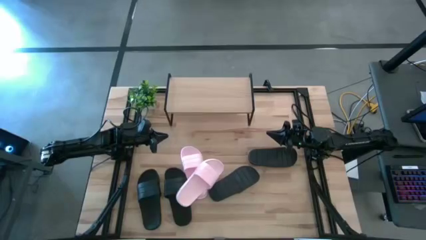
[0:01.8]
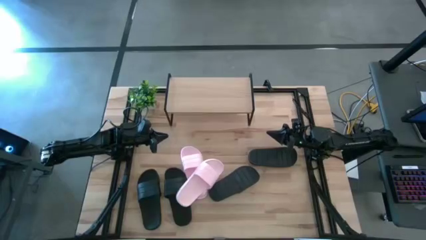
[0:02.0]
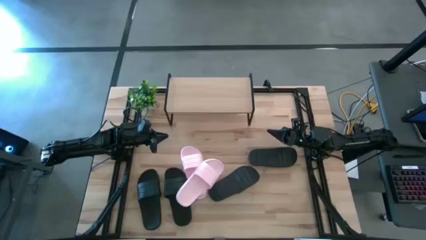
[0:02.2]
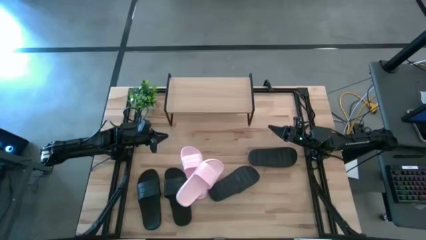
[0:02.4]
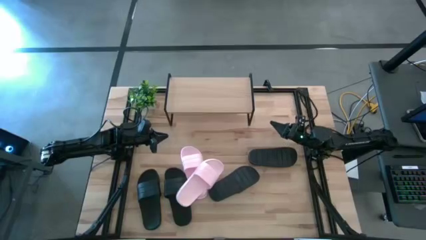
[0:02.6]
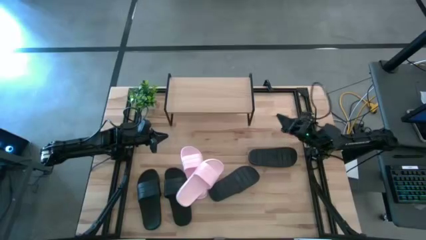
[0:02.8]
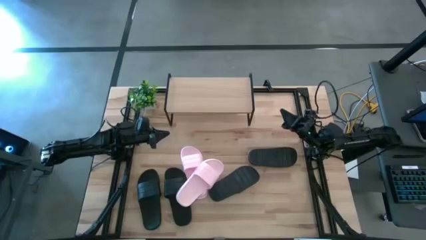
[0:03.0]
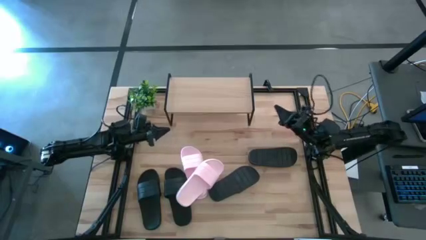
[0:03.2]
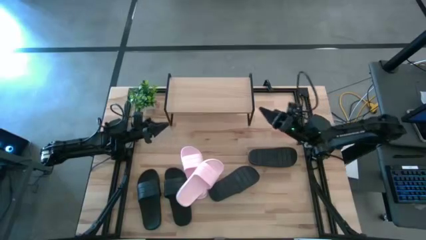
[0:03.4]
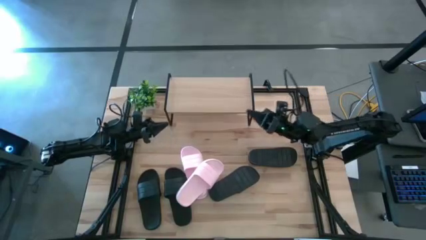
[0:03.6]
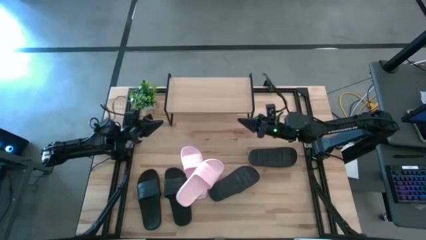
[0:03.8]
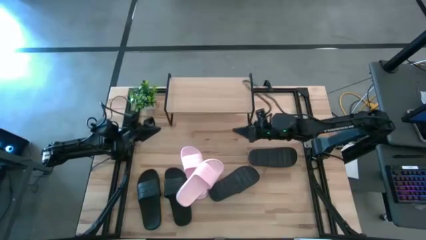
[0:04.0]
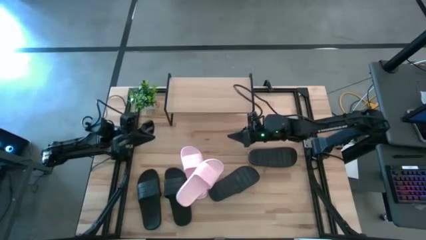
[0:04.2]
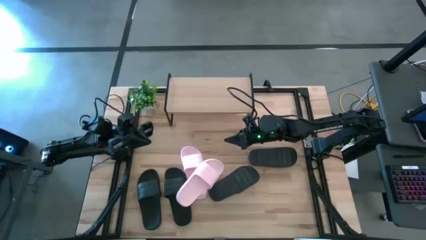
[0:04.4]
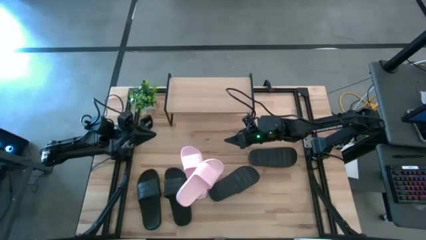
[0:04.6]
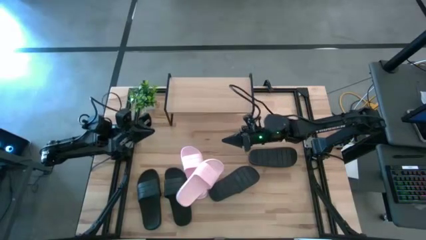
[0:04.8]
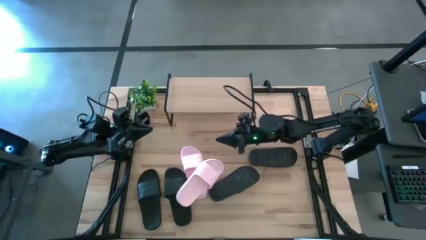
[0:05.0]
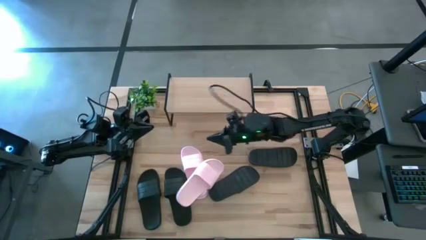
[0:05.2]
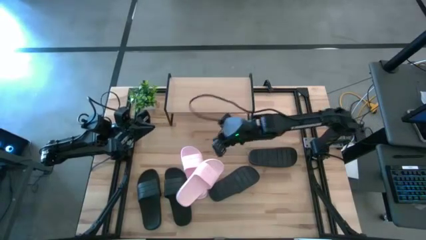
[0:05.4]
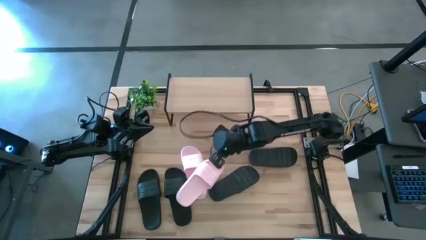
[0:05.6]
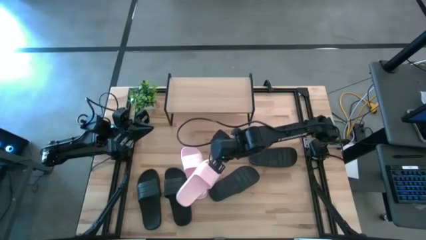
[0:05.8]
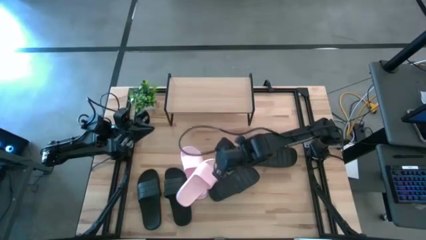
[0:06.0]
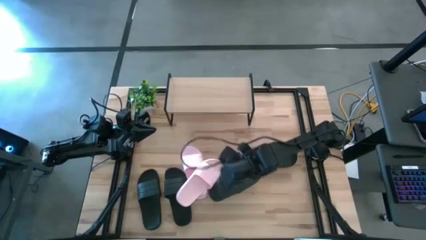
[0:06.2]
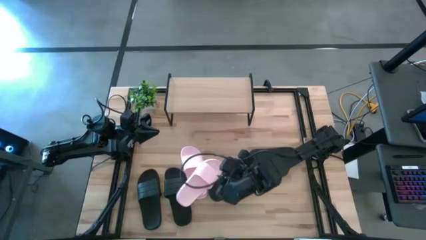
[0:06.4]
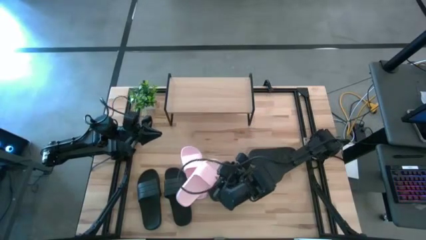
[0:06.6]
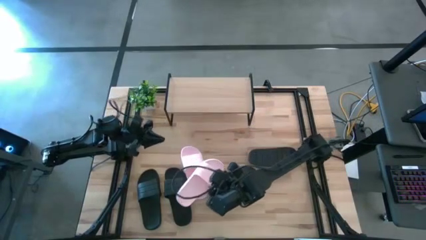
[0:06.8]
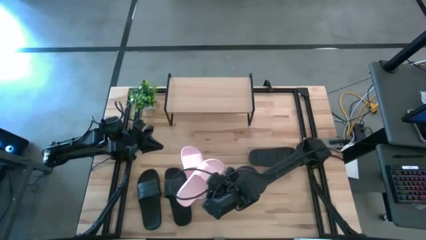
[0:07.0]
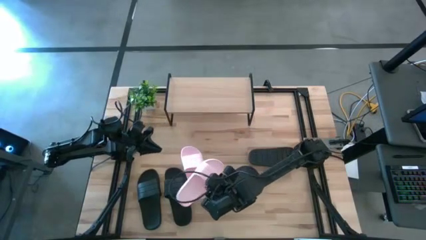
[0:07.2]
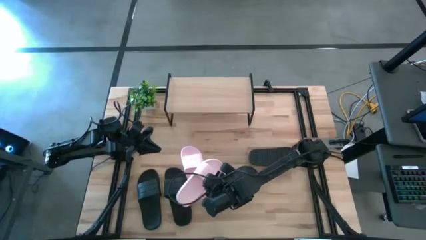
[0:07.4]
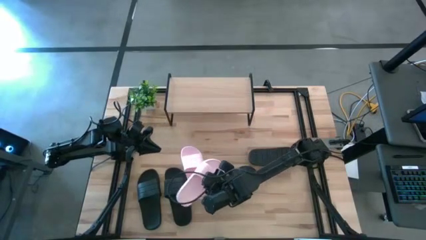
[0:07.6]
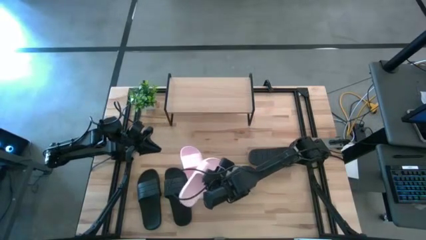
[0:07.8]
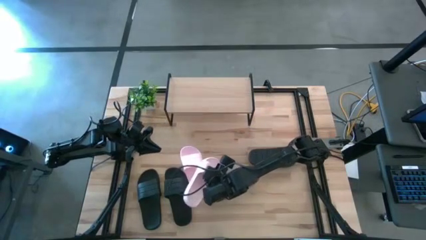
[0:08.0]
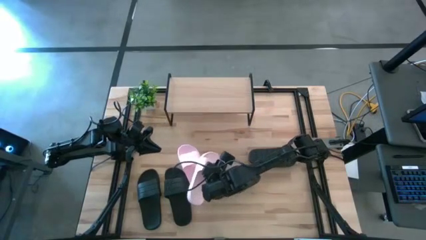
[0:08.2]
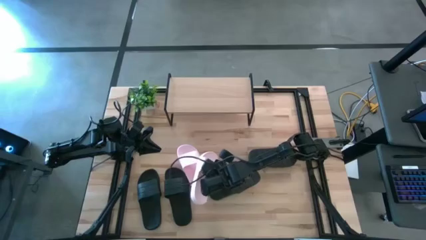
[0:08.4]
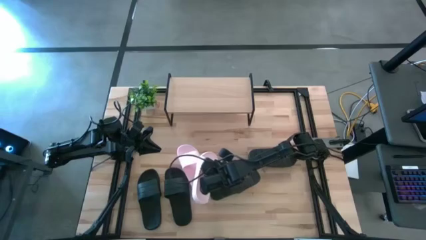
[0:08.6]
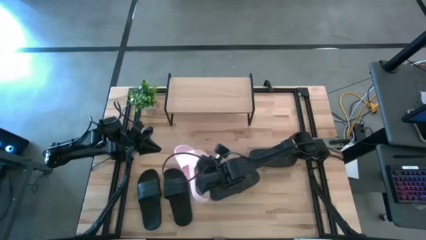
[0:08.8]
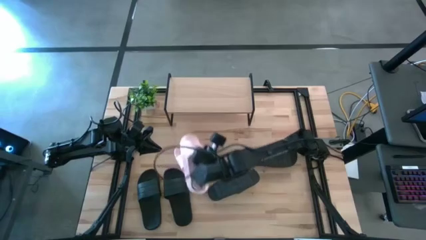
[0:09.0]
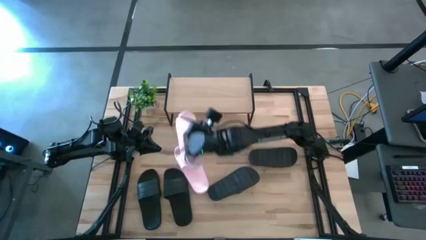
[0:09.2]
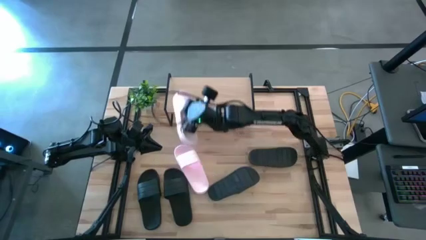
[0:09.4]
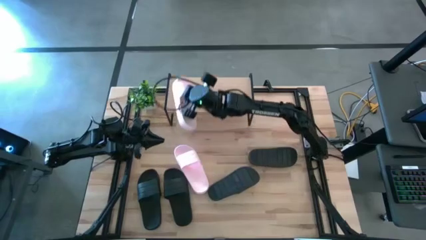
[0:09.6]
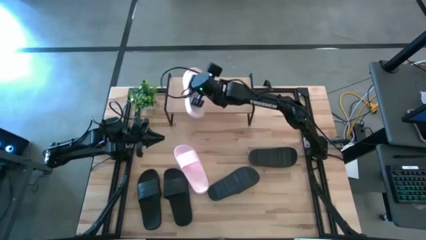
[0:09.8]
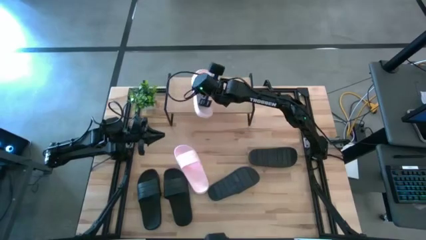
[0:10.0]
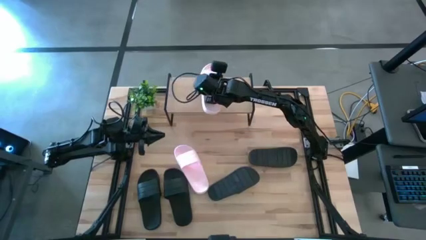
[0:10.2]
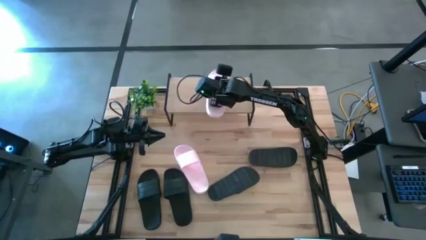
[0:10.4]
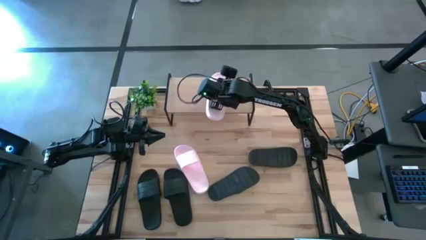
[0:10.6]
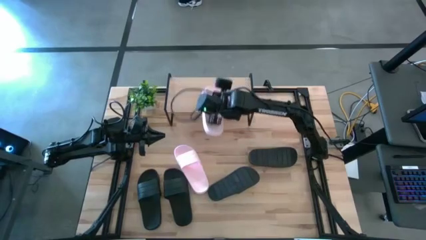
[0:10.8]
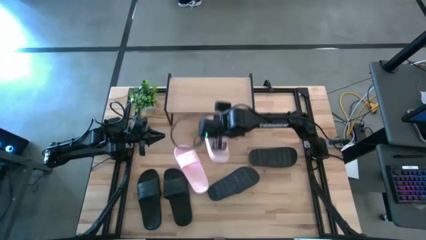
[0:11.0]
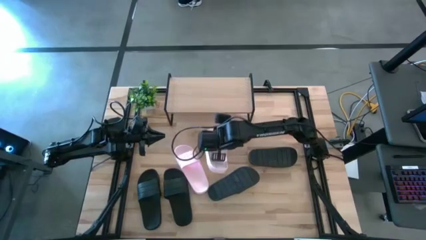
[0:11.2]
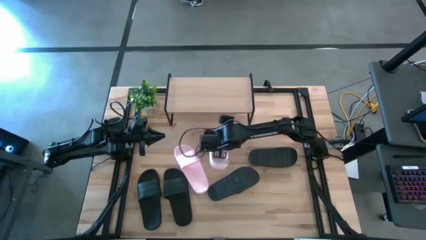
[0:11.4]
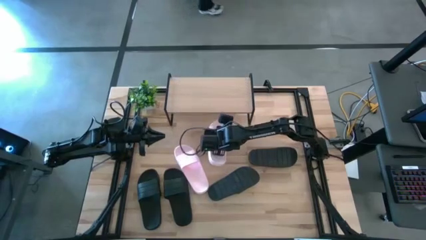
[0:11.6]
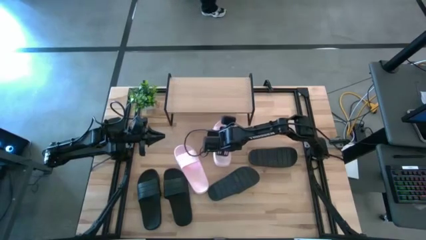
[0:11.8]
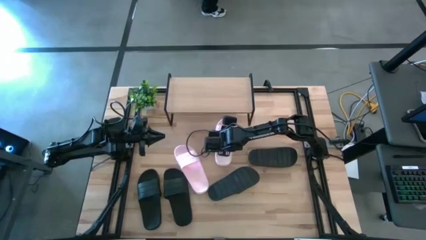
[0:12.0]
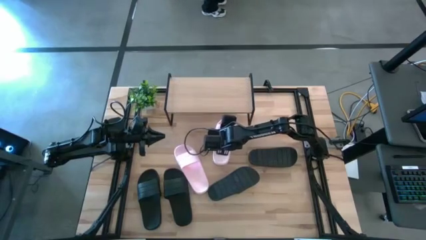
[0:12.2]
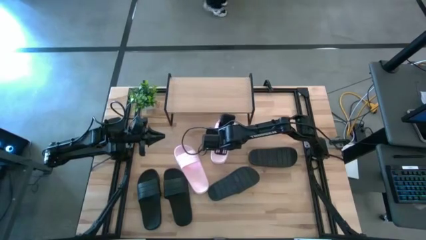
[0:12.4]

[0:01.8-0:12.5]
Task: Pick and place slides into the shelf
Put the top pink slipper under the shelf
